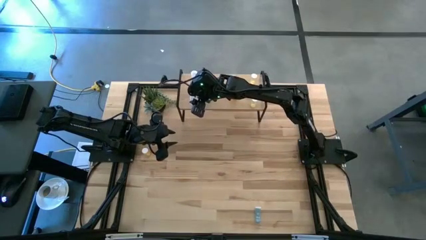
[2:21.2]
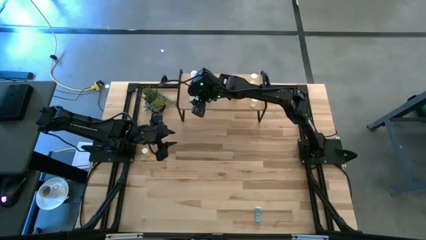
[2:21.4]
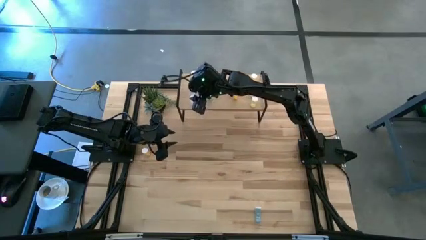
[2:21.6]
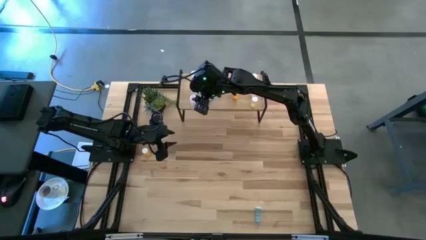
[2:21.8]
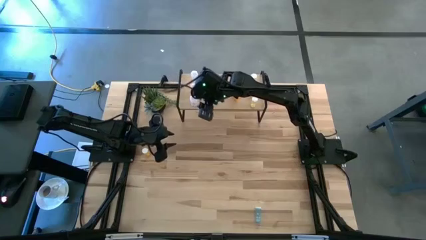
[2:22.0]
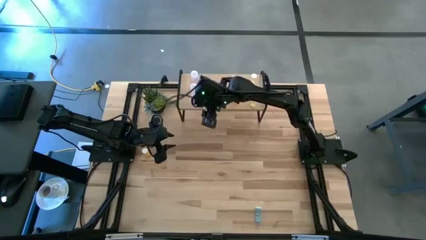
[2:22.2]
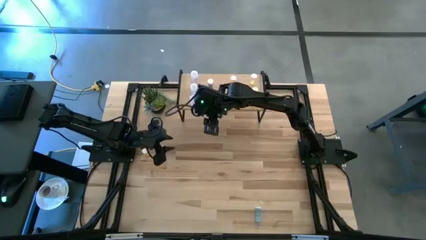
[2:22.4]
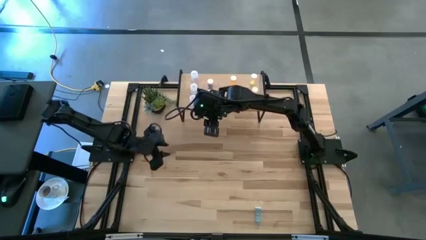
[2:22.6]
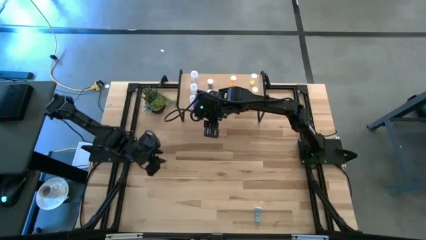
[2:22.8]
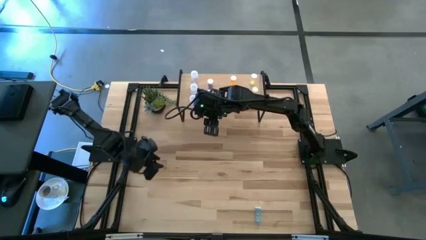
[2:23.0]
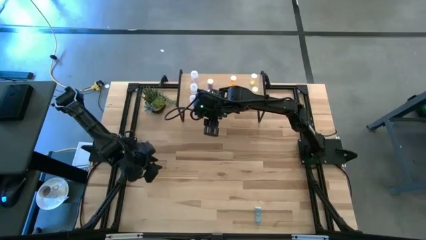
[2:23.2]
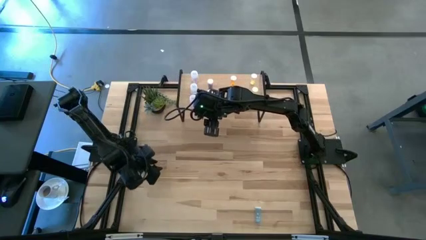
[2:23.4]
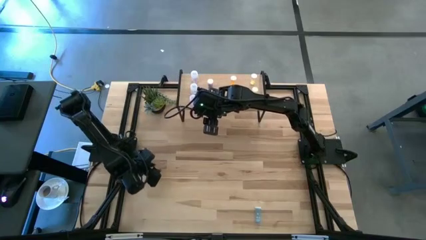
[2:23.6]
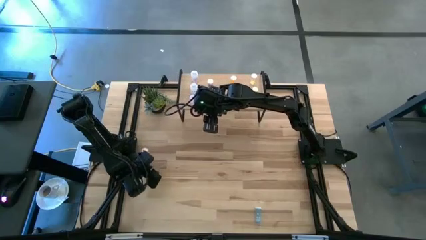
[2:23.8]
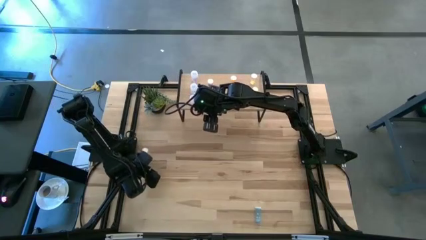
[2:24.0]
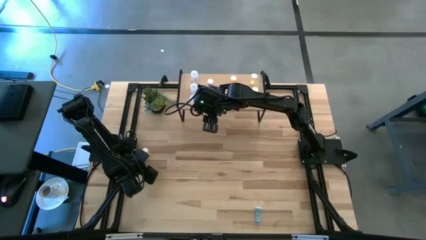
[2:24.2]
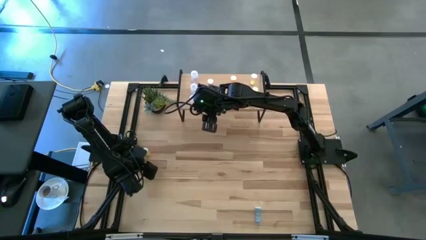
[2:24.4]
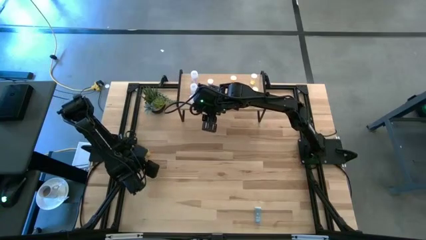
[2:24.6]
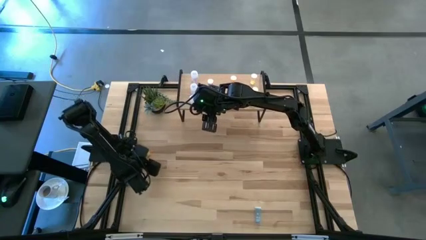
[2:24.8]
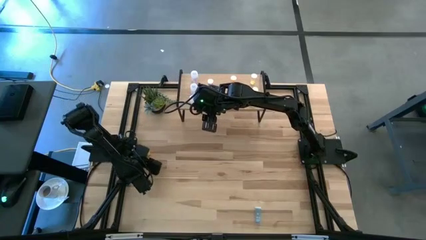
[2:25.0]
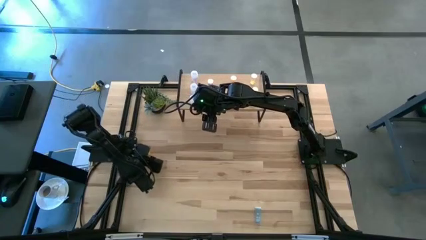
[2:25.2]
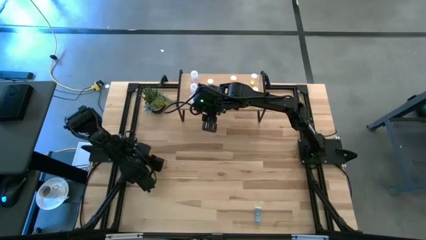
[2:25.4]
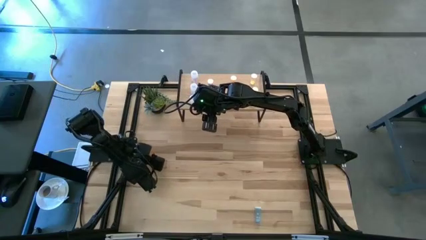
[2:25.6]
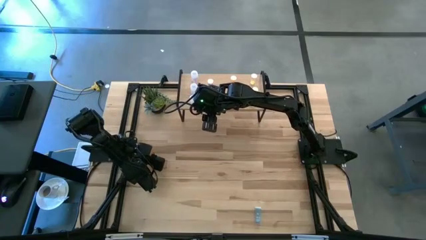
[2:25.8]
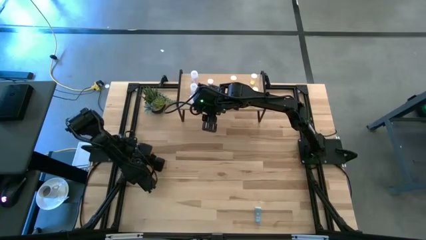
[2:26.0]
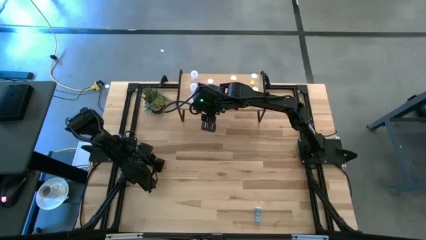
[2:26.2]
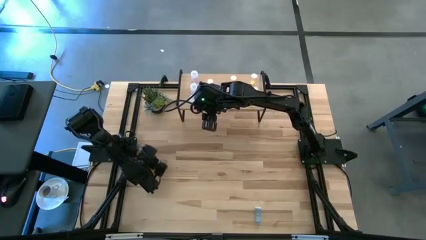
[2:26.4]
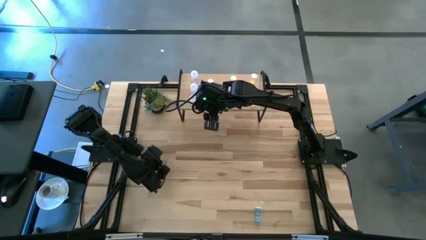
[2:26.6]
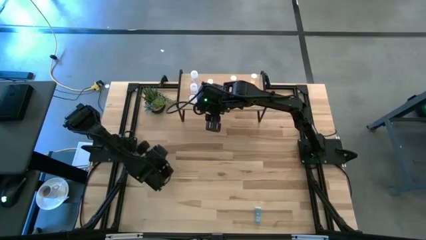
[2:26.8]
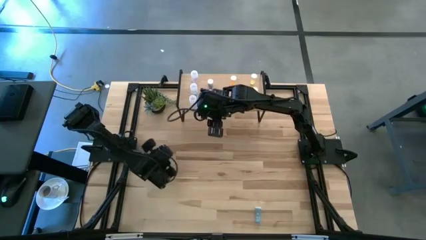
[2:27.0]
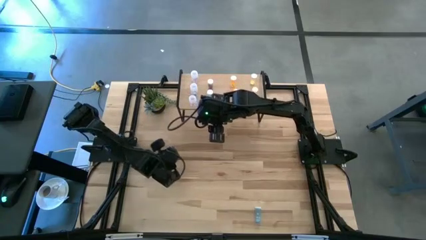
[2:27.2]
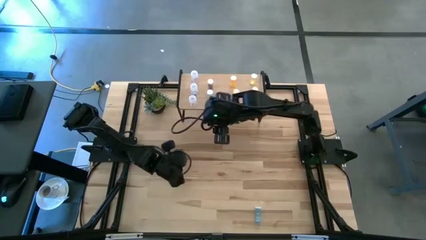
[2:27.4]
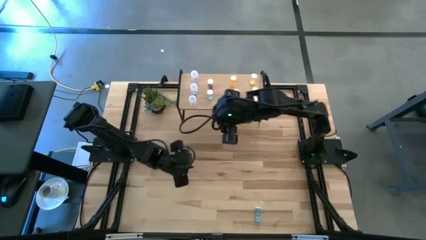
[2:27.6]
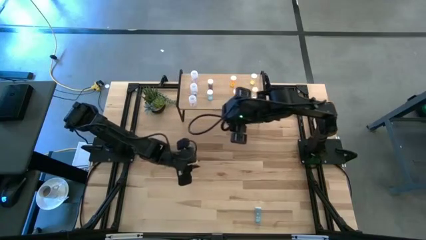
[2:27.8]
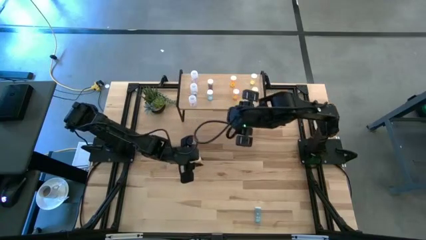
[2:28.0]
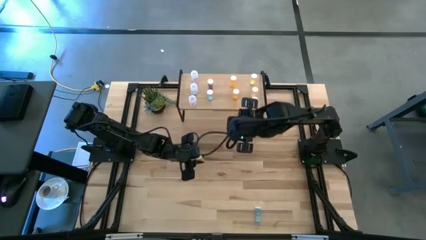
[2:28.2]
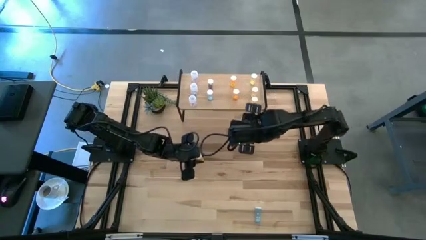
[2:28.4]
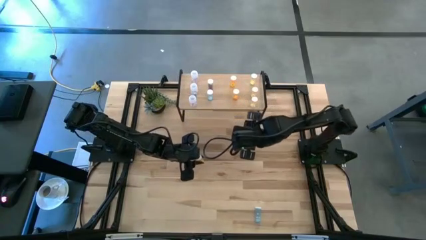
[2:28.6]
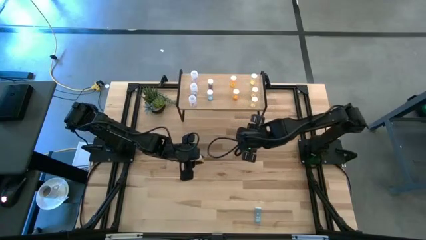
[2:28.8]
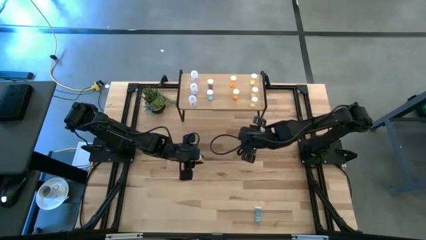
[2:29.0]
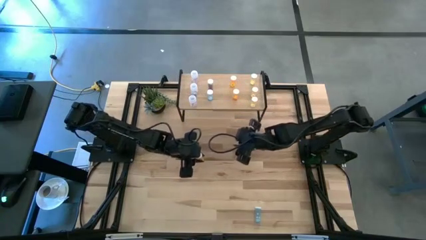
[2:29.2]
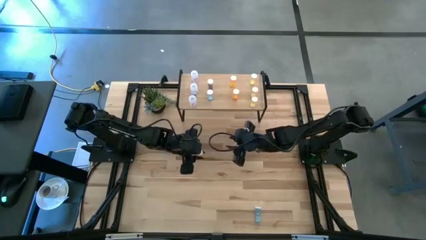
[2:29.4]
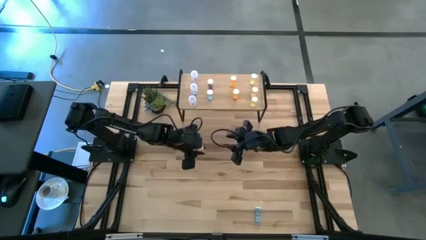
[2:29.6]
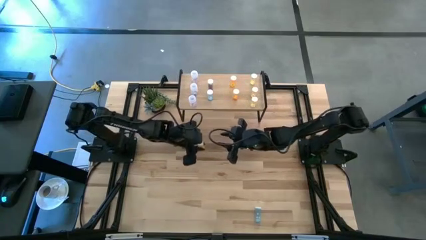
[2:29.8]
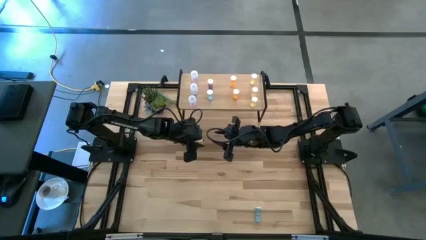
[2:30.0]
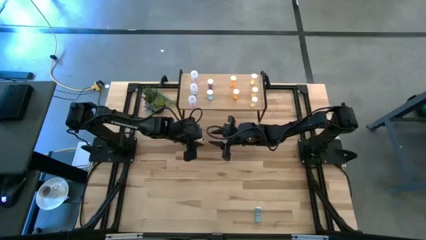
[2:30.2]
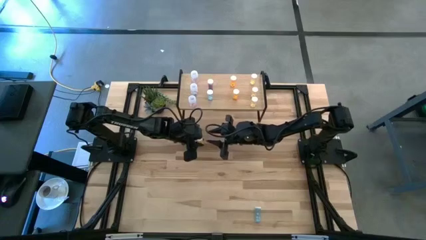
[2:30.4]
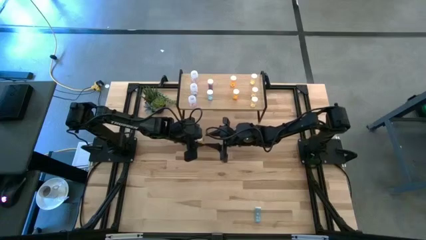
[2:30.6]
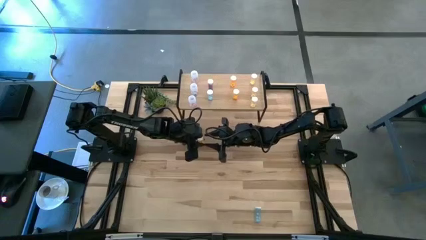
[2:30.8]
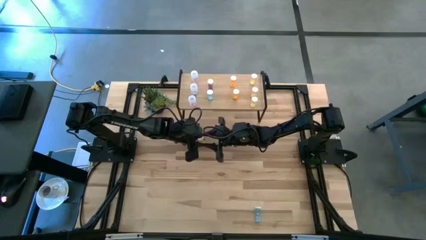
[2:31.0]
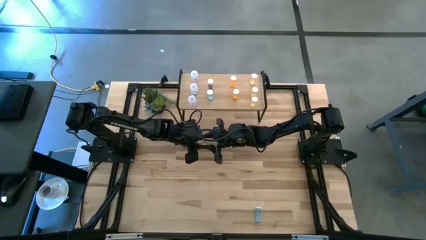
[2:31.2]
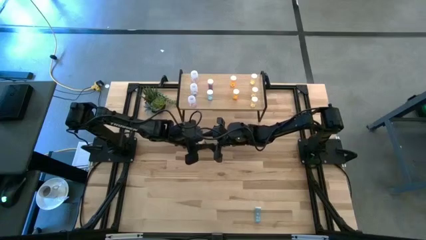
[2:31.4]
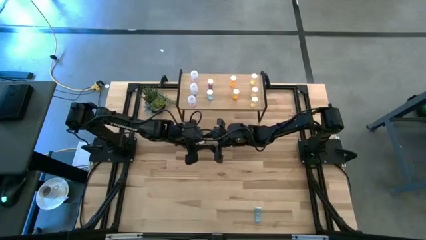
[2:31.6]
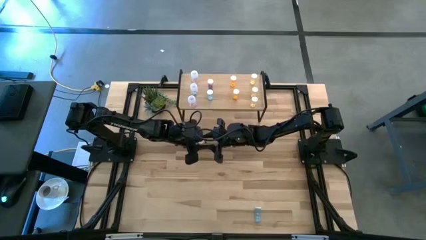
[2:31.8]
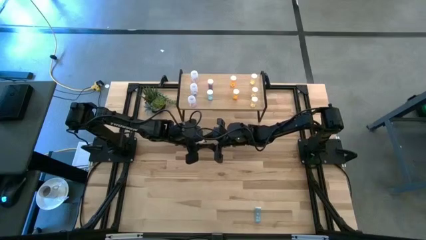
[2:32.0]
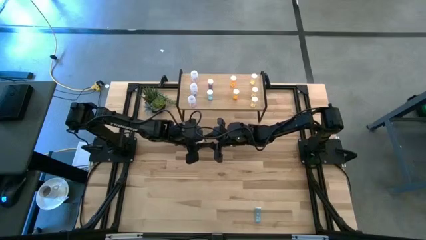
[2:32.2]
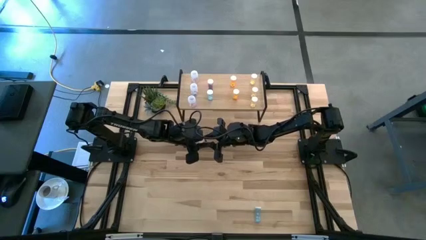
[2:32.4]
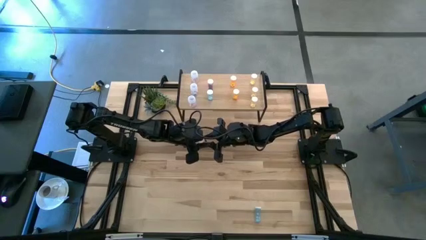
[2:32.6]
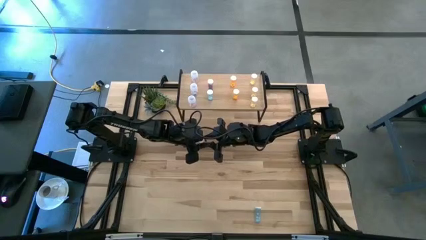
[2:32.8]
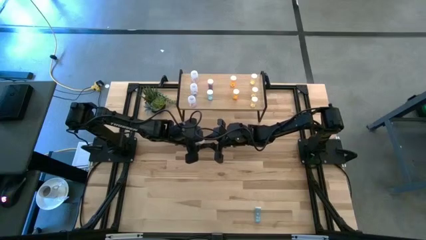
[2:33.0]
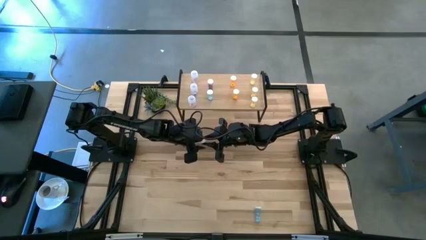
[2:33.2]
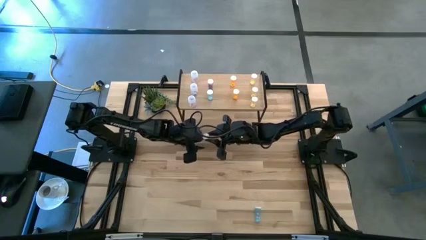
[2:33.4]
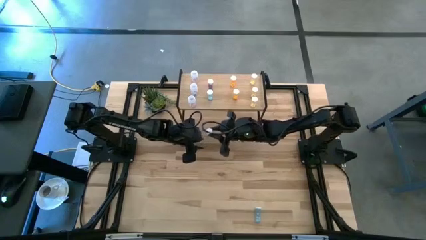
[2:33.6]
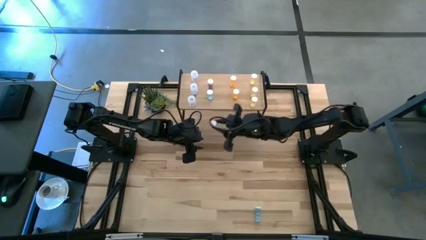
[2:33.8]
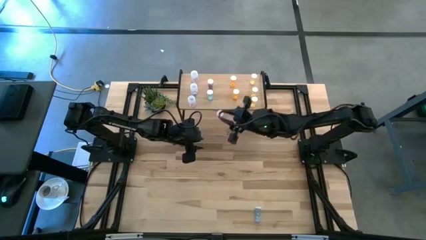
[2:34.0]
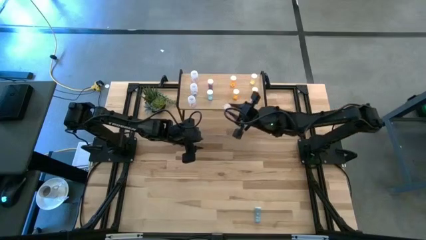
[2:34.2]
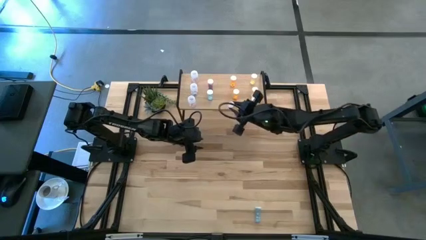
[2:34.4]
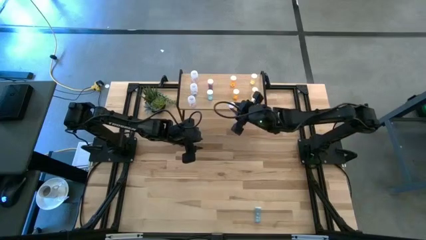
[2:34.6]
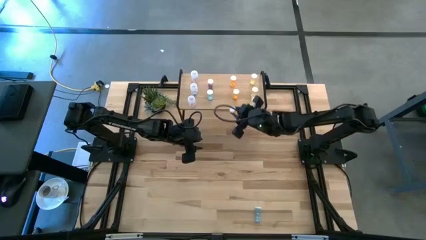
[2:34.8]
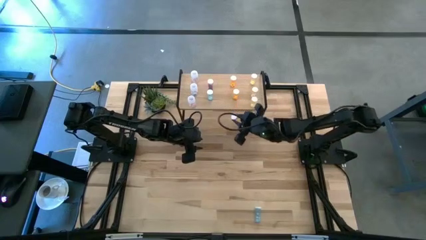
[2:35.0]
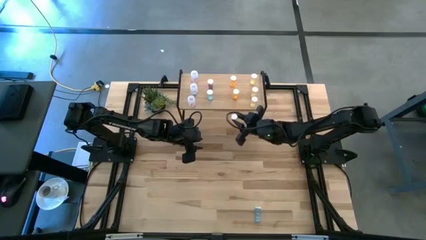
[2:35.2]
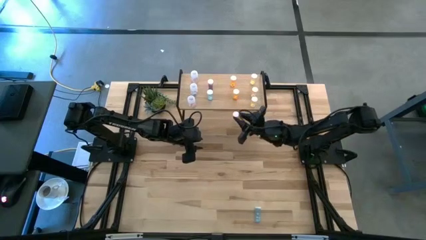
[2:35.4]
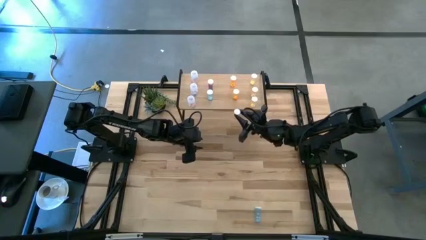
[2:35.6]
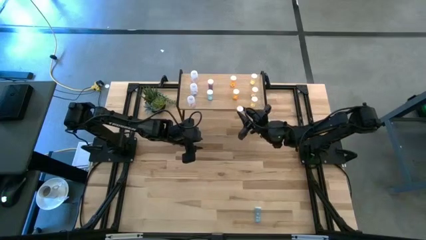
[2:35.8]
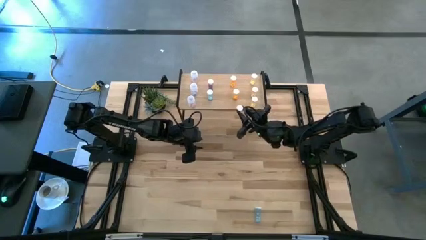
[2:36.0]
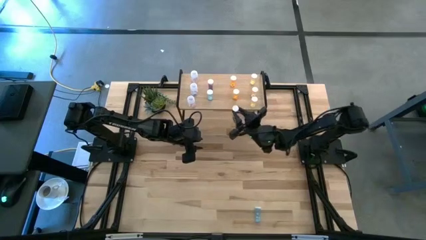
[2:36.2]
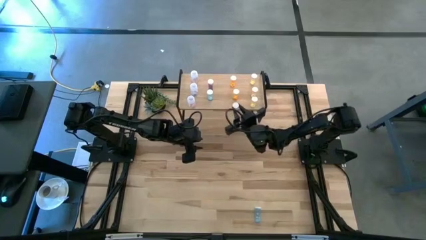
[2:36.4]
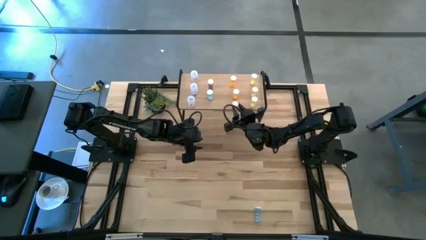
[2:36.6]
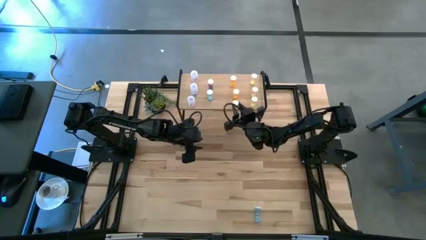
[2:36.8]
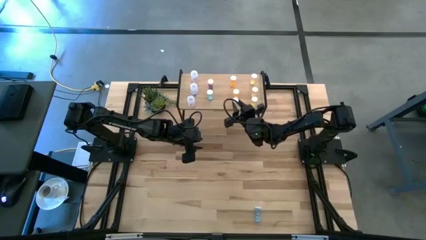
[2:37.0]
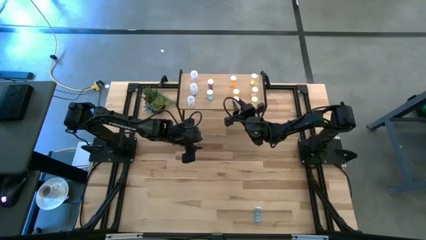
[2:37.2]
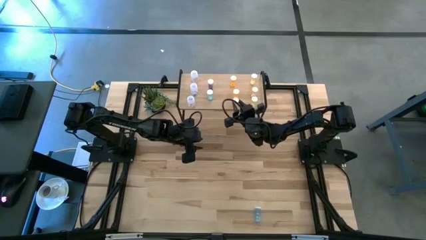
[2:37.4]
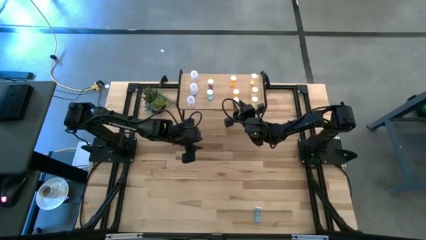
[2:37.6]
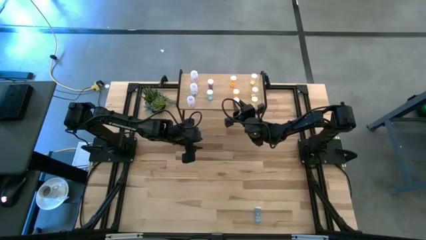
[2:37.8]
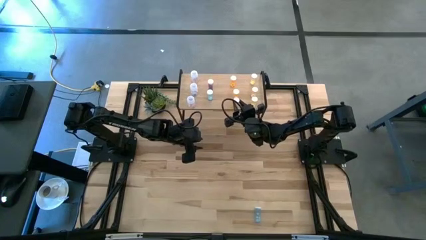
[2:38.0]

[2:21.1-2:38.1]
Task: Pick and place medicine bottles onto shelf by color
Put the orange pill bottle on the shelf aligned with the orange pill bottles
